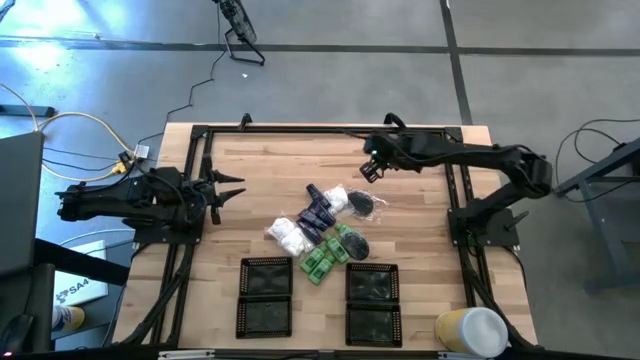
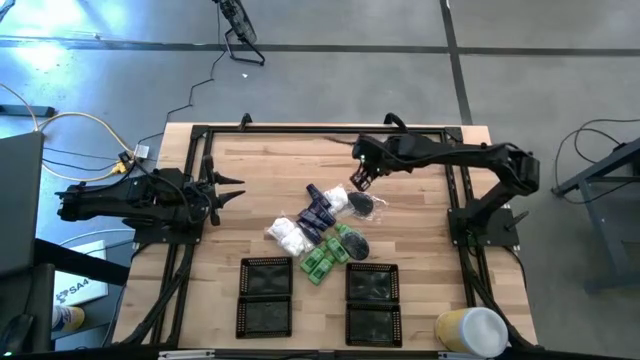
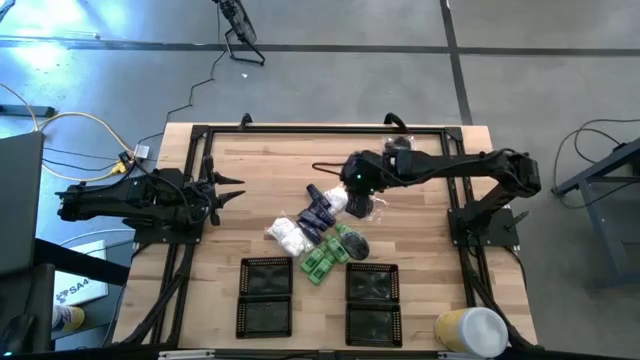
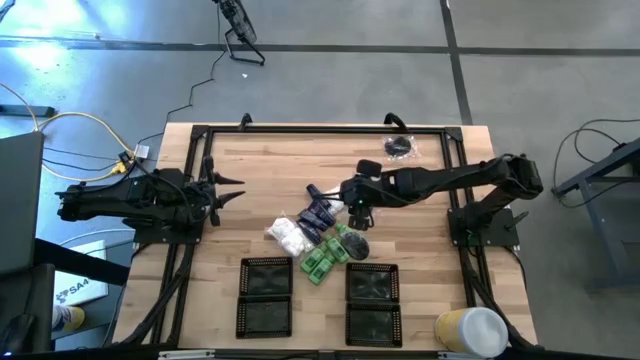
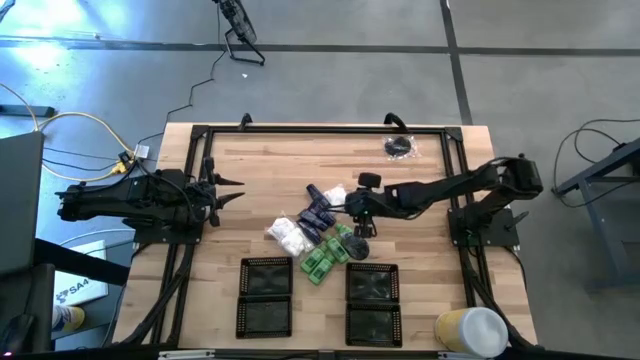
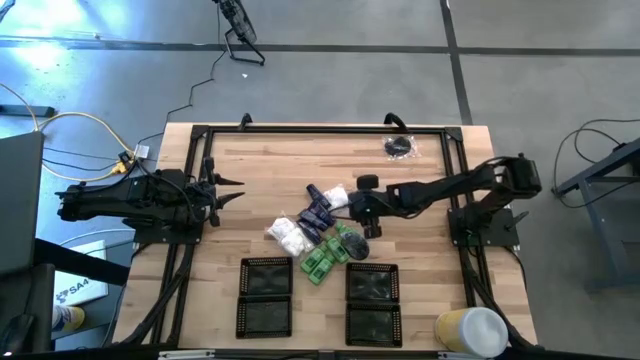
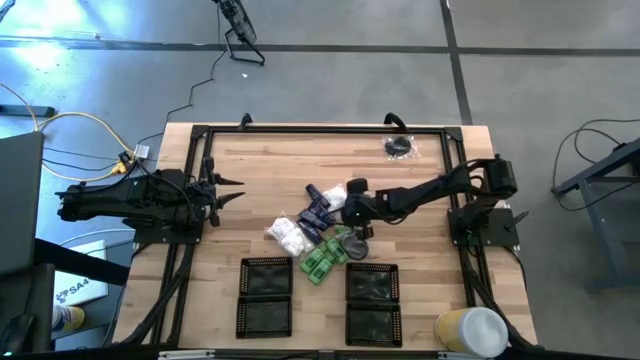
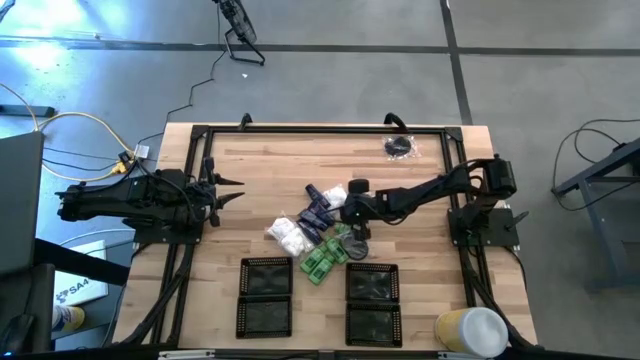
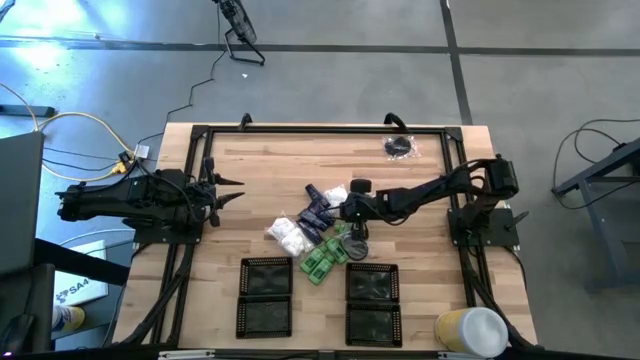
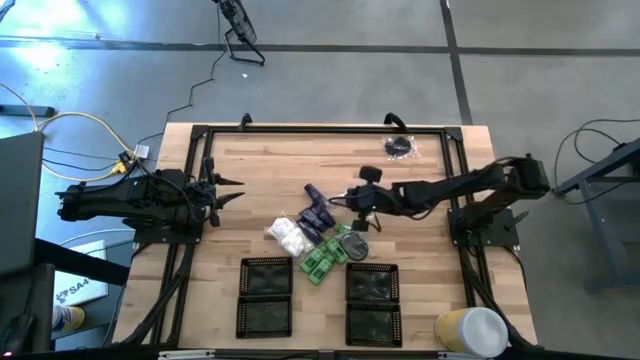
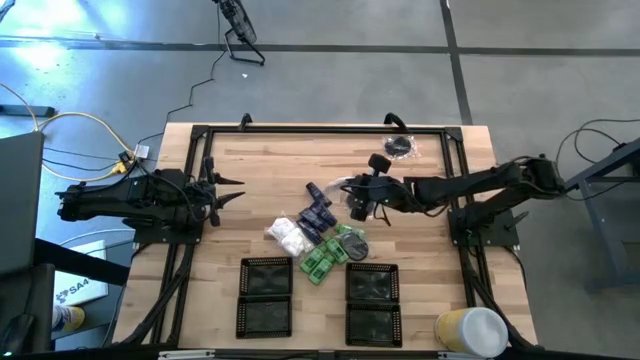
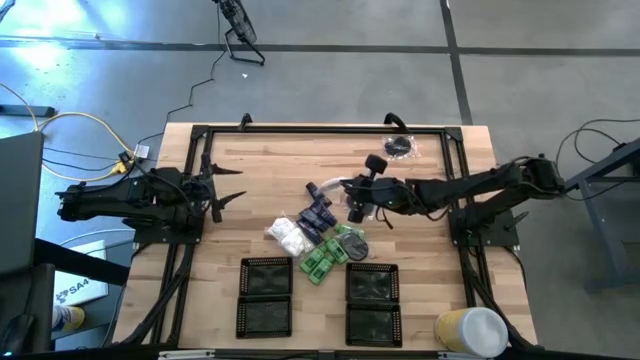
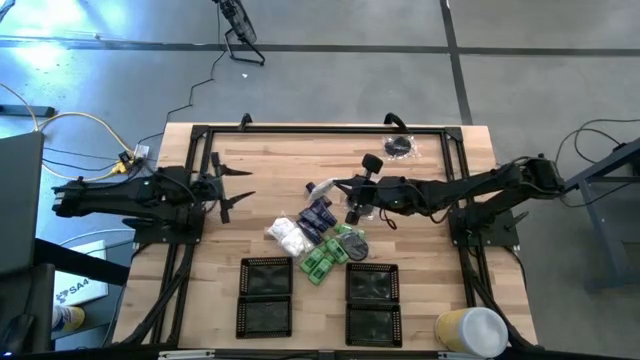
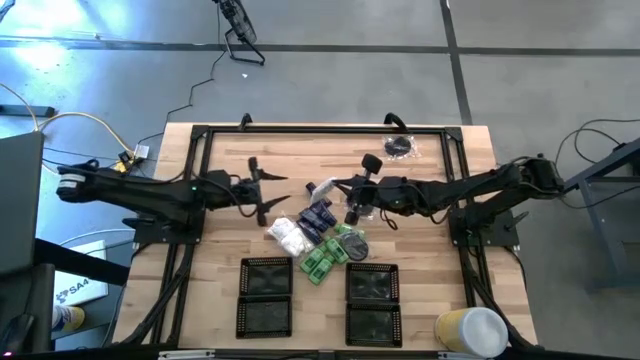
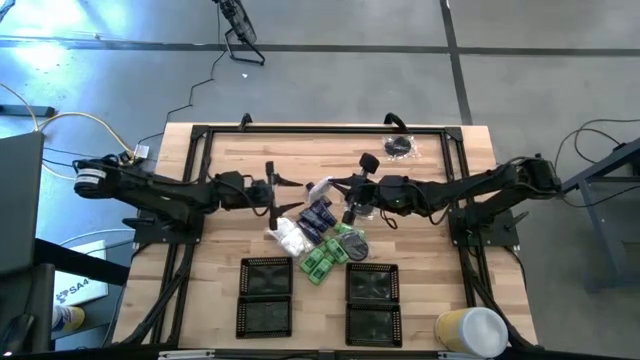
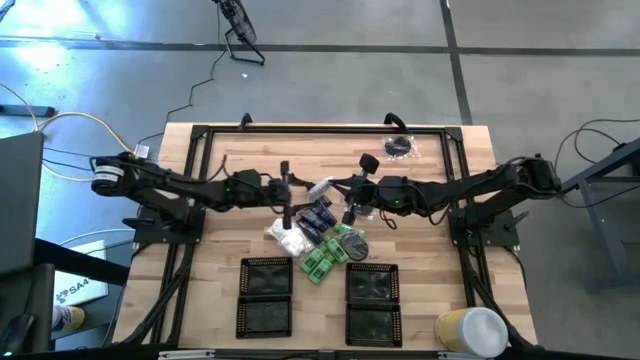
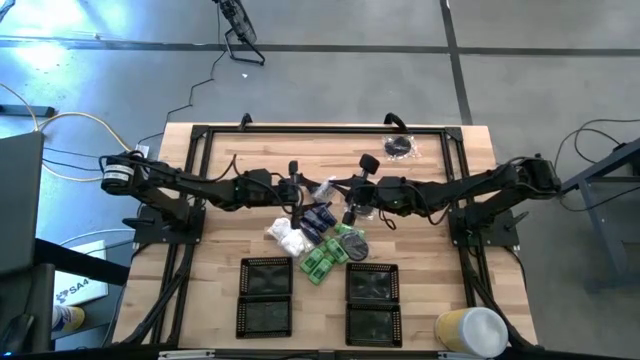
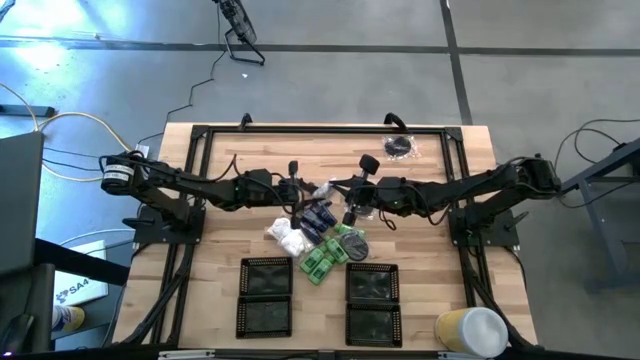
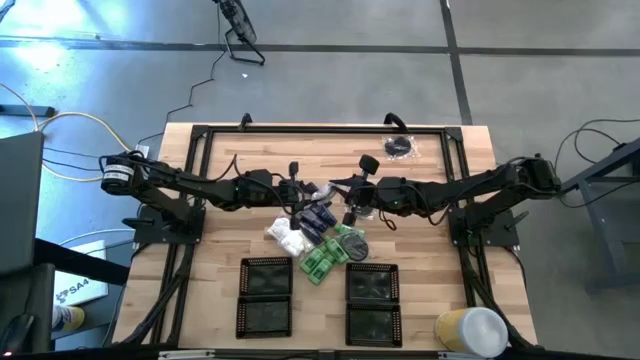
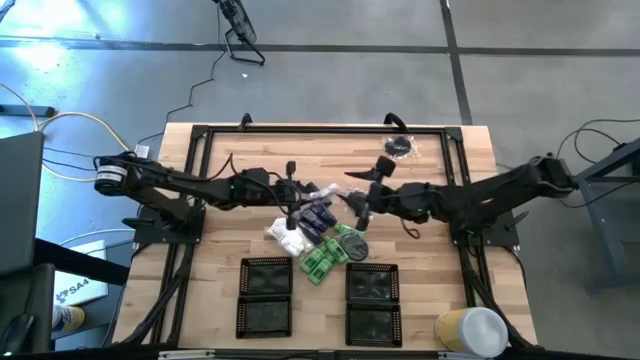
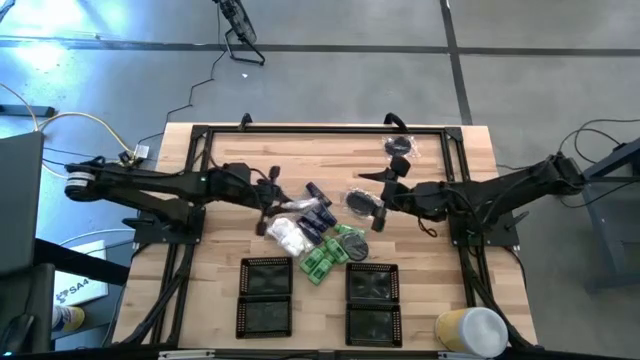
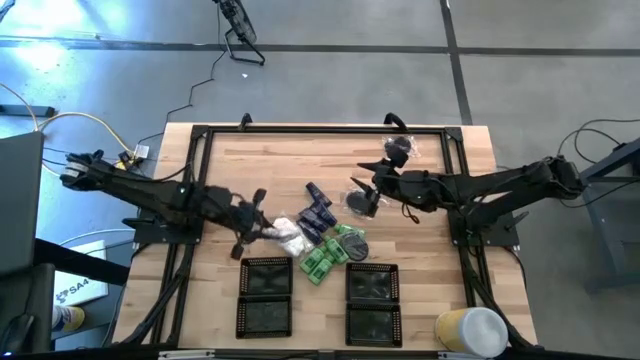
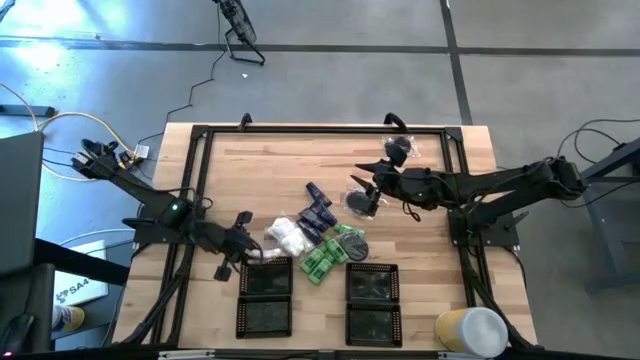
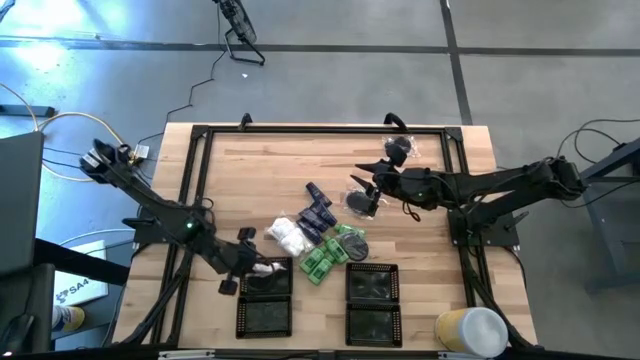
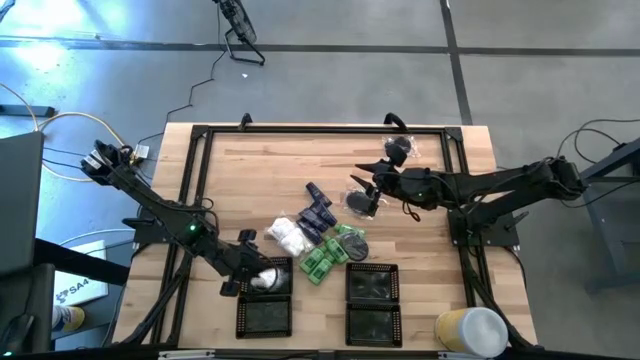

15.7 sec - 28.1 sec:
Task: Pick & Place Travel size toiletries
Put the white cotton pack into the top left black bin

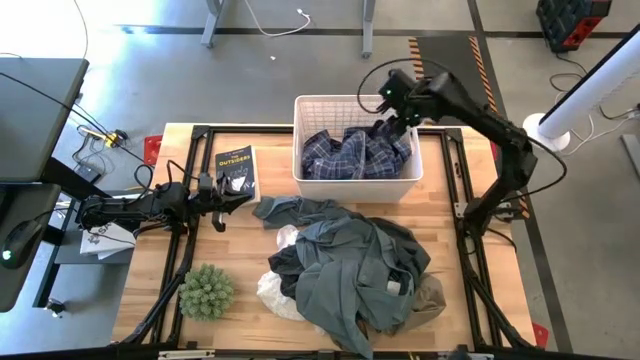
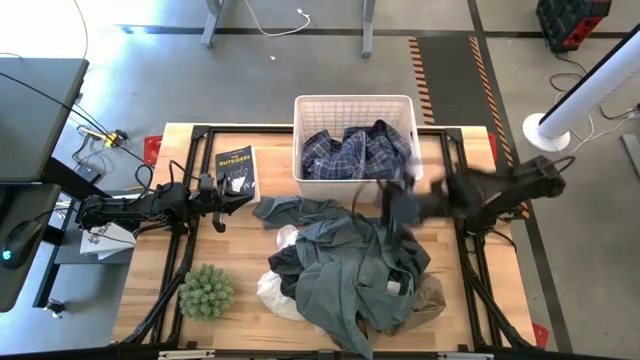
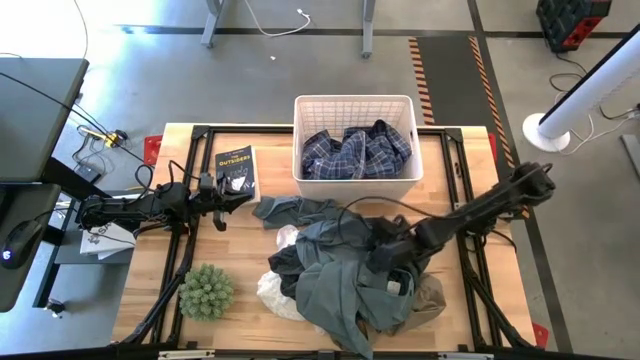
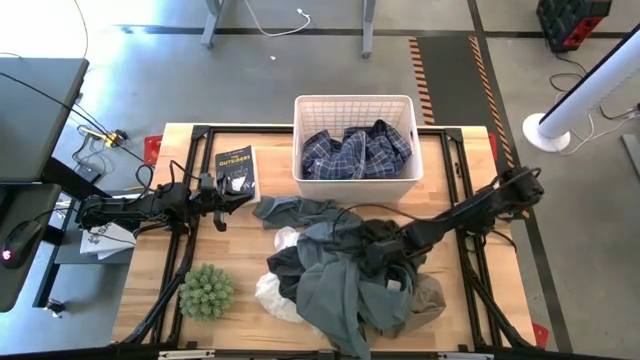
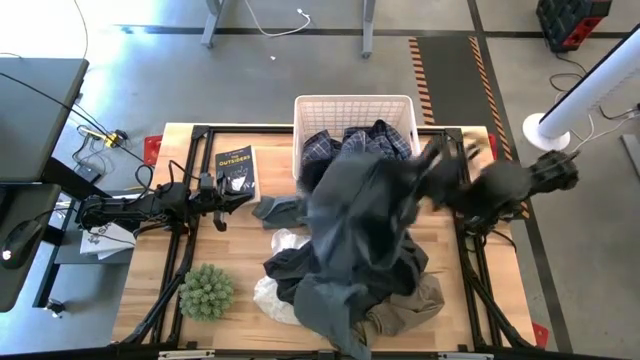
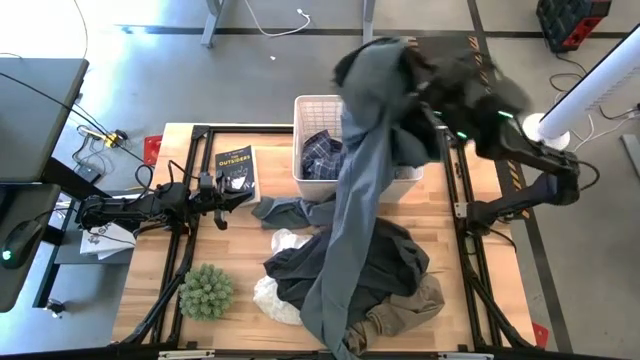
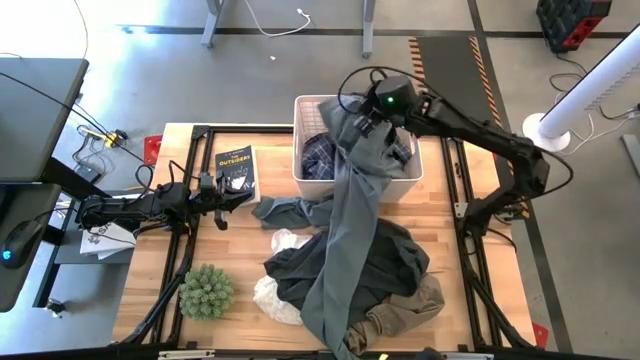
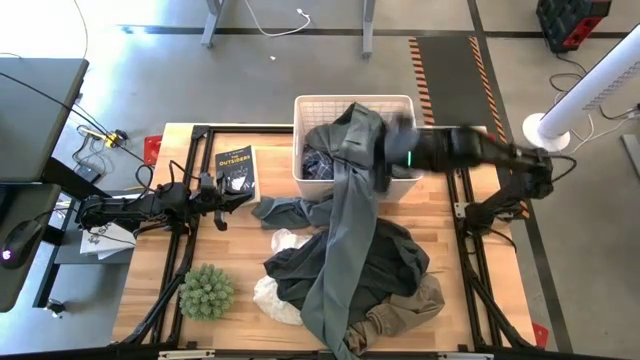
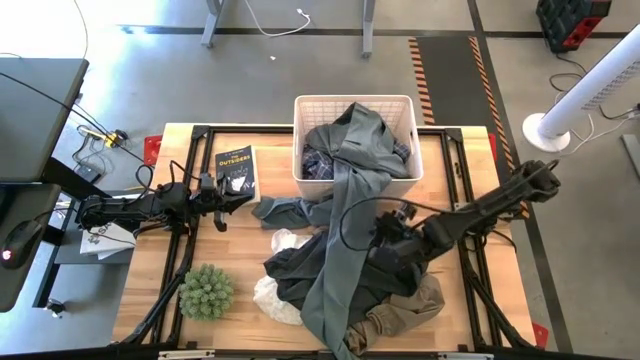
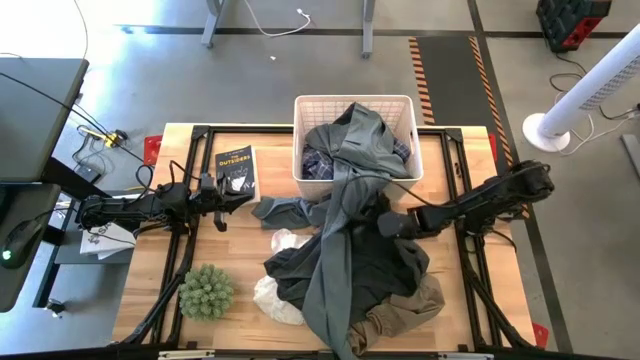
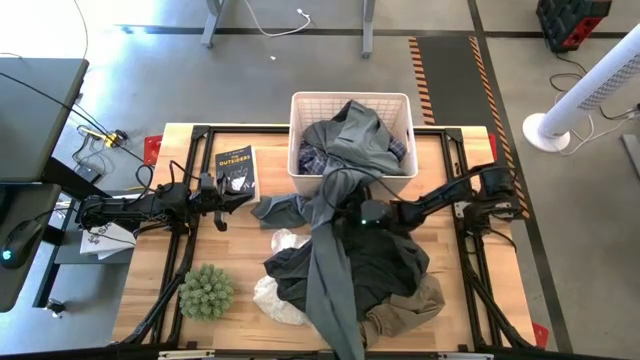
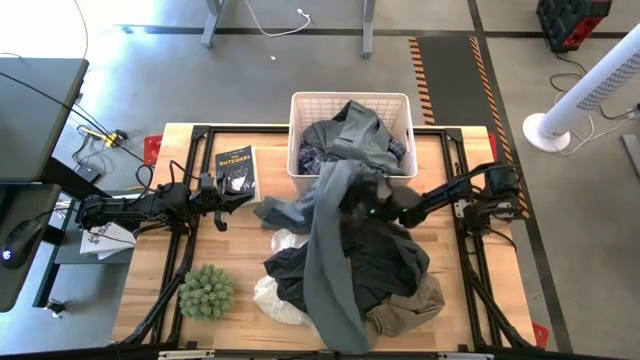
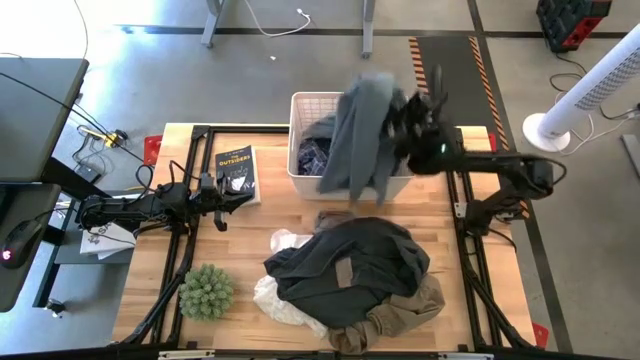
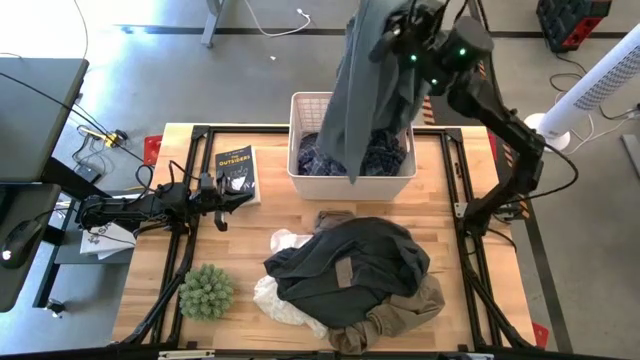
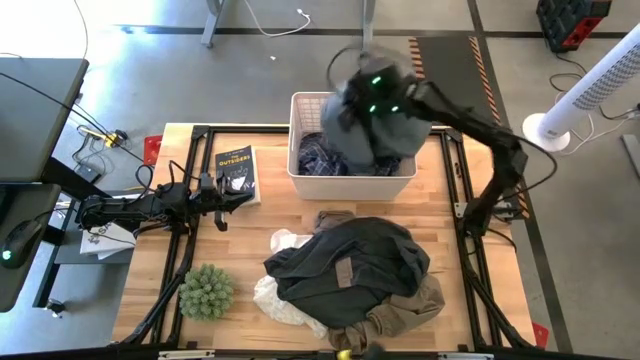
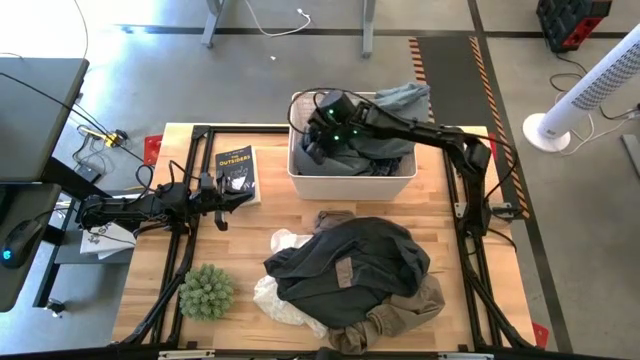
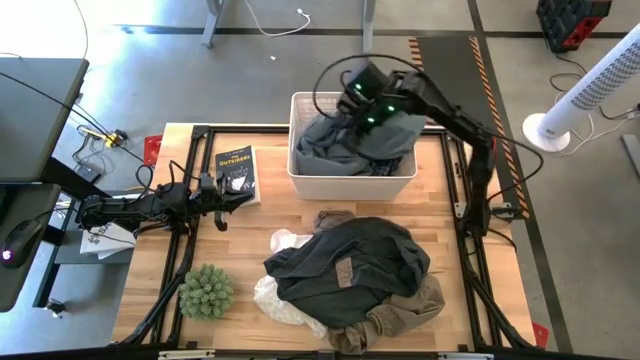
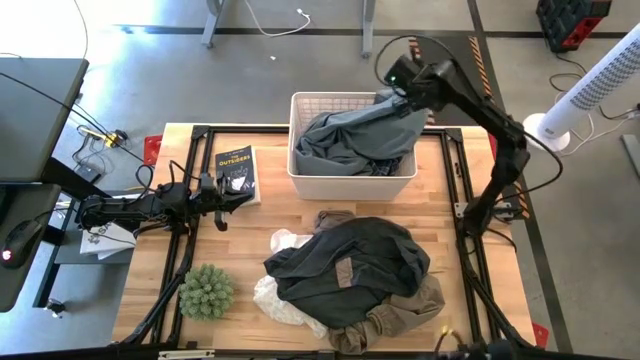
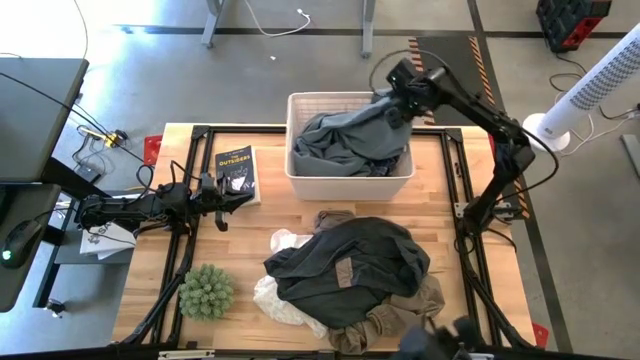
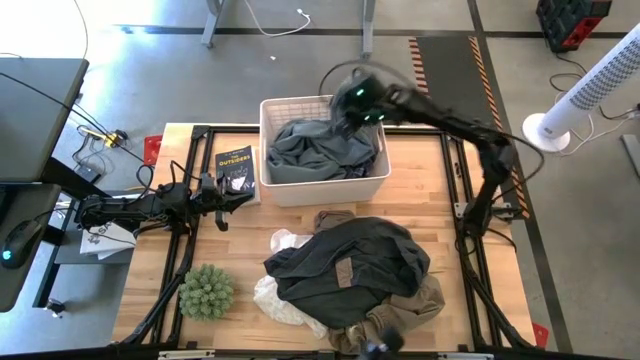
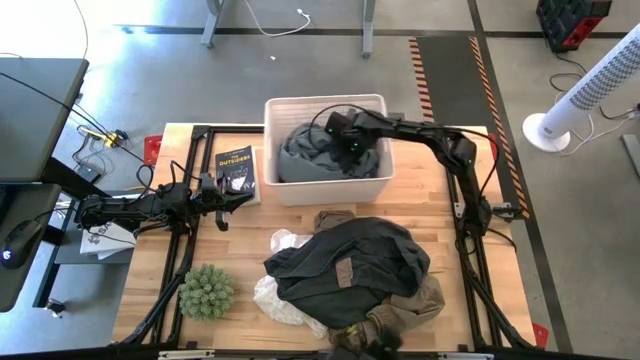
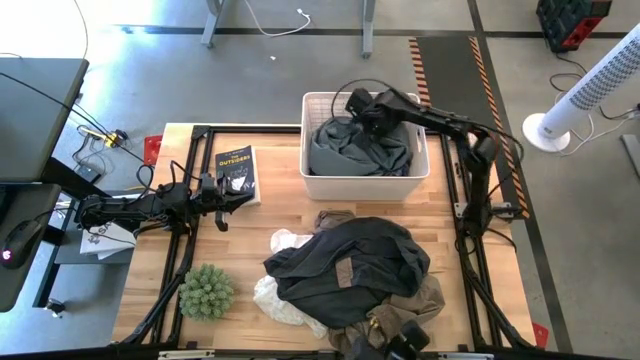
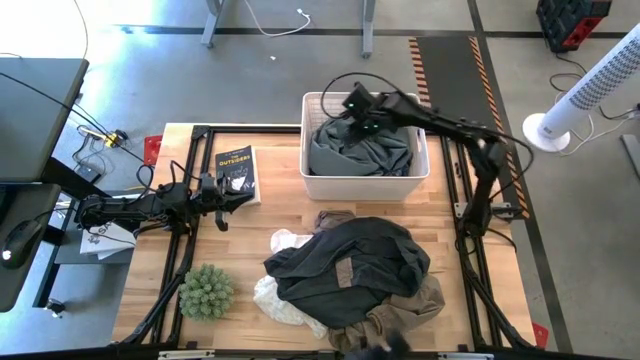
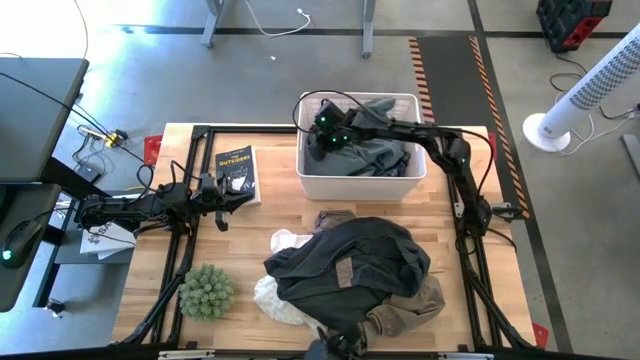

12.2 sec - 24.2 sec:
Task: Sort clothes
Put the blue pants into the white bin
